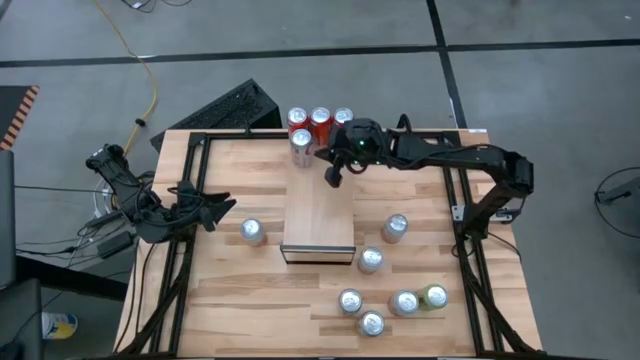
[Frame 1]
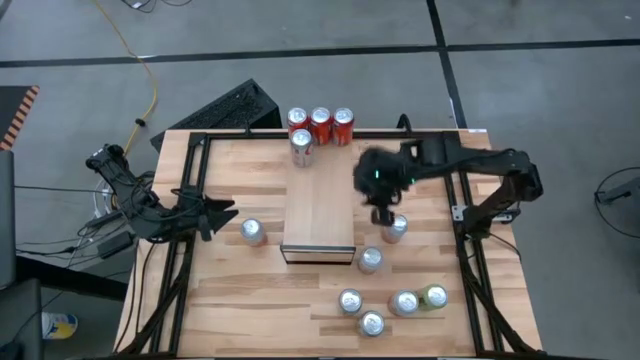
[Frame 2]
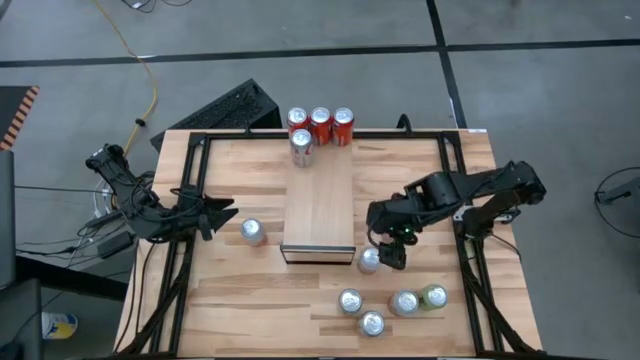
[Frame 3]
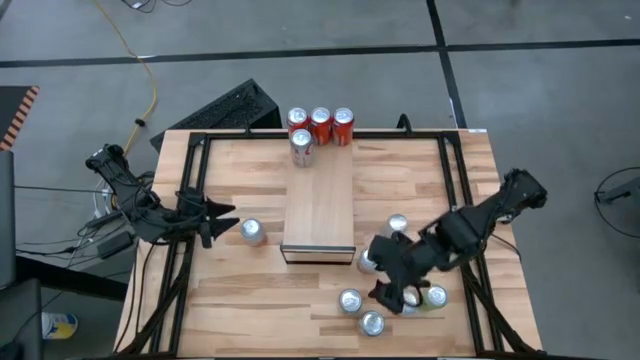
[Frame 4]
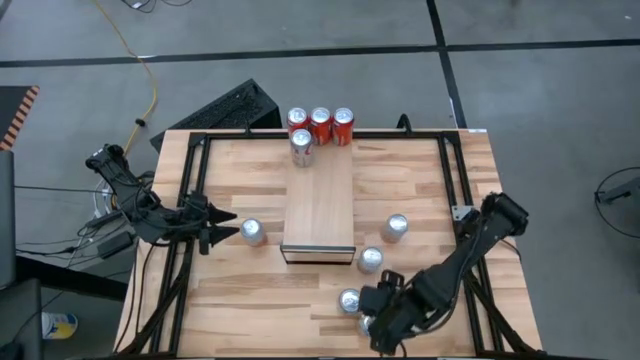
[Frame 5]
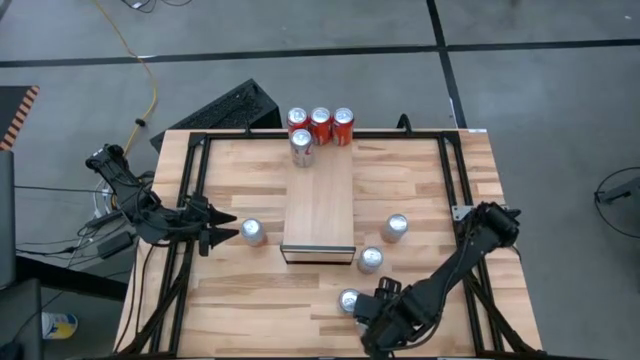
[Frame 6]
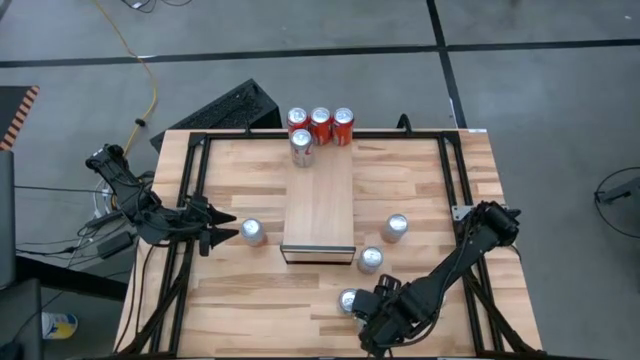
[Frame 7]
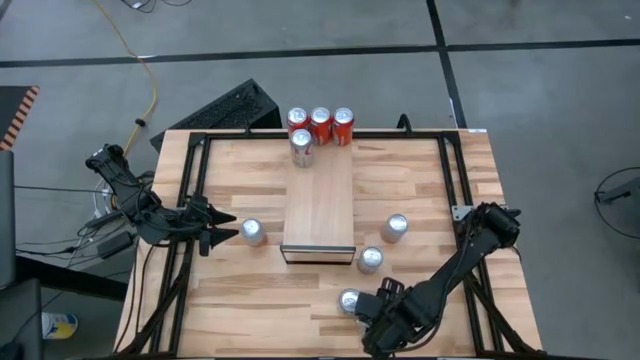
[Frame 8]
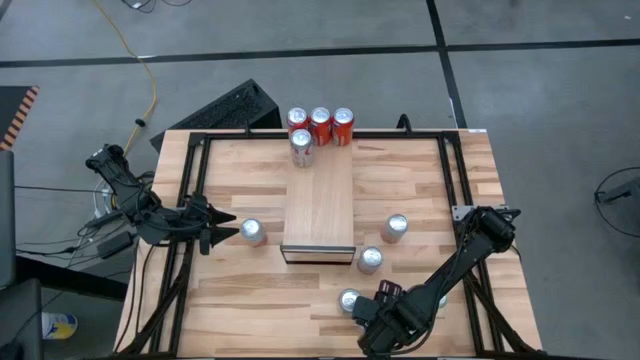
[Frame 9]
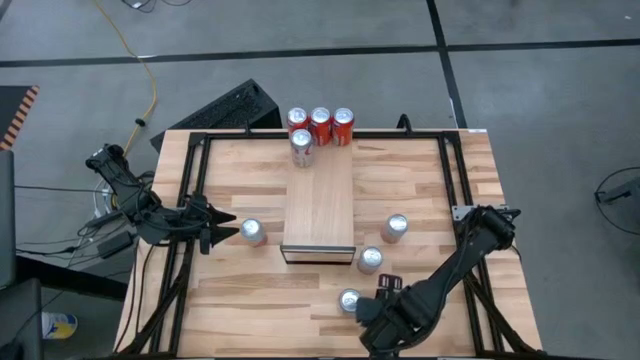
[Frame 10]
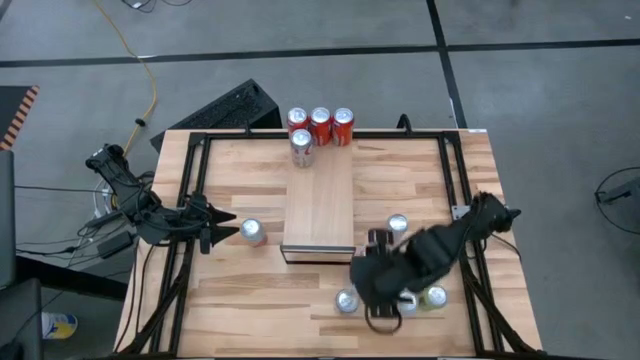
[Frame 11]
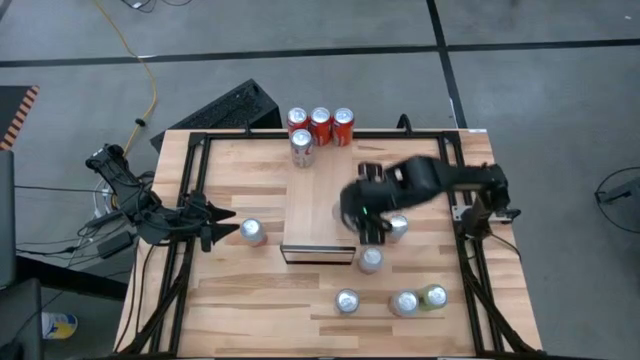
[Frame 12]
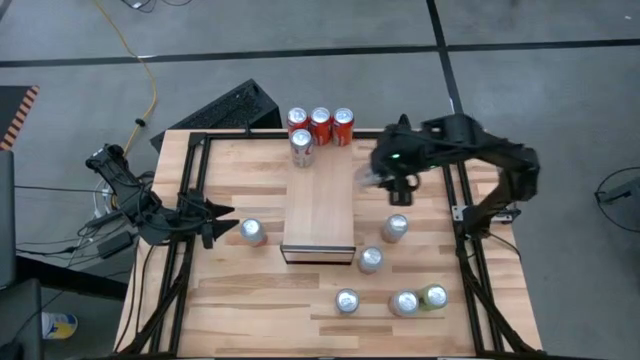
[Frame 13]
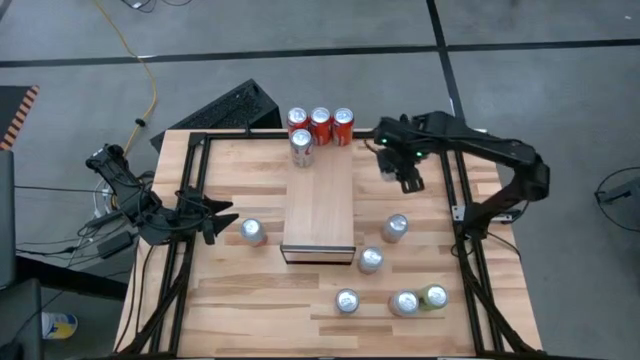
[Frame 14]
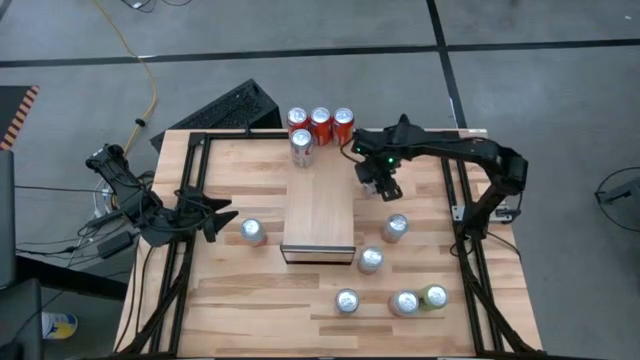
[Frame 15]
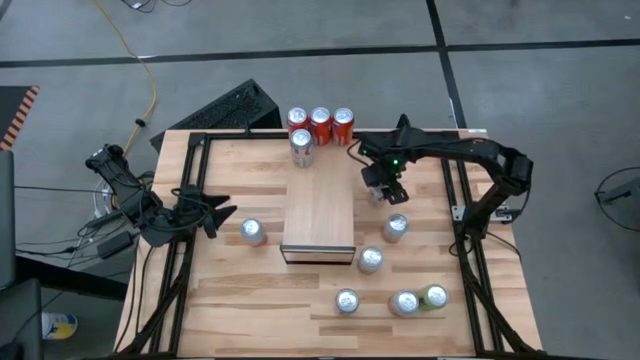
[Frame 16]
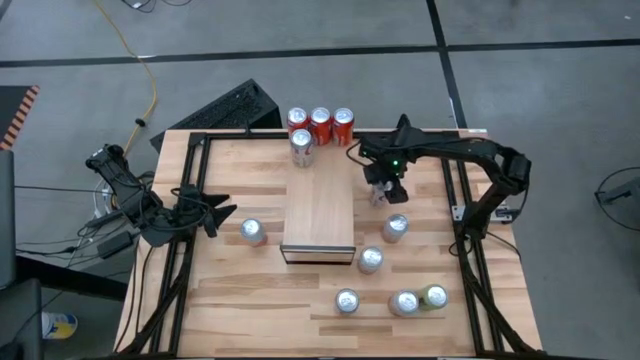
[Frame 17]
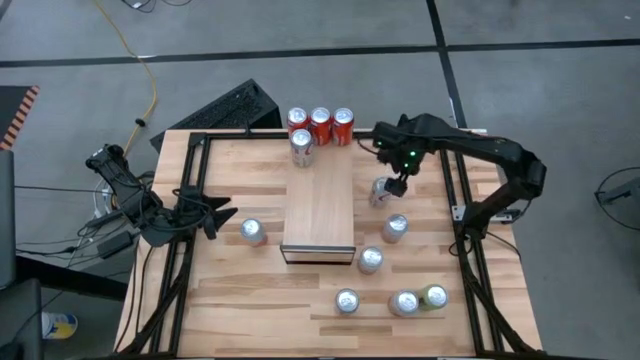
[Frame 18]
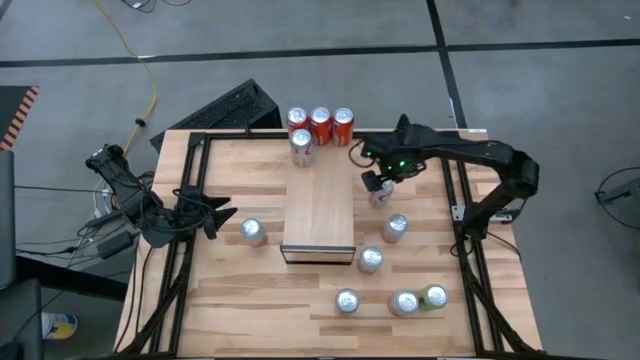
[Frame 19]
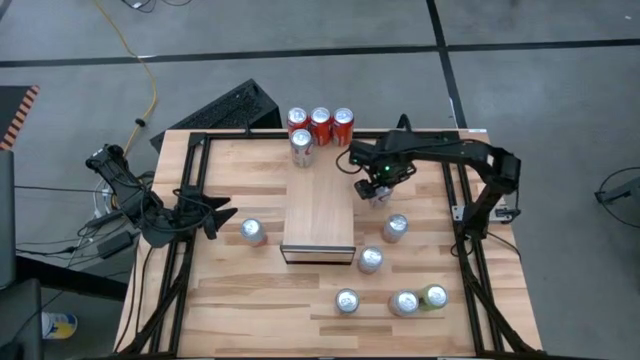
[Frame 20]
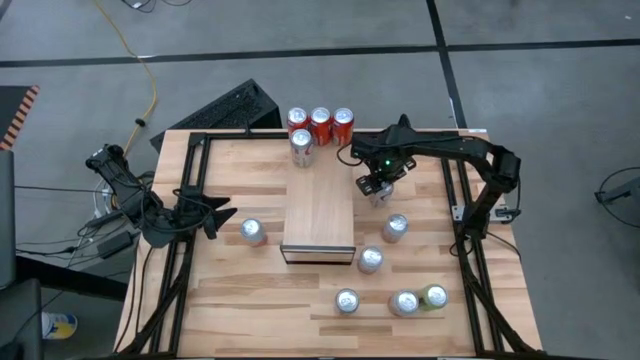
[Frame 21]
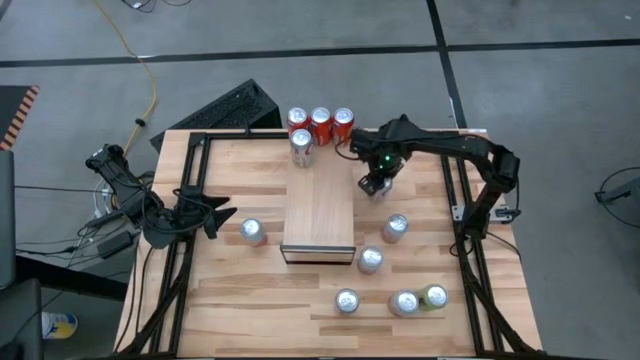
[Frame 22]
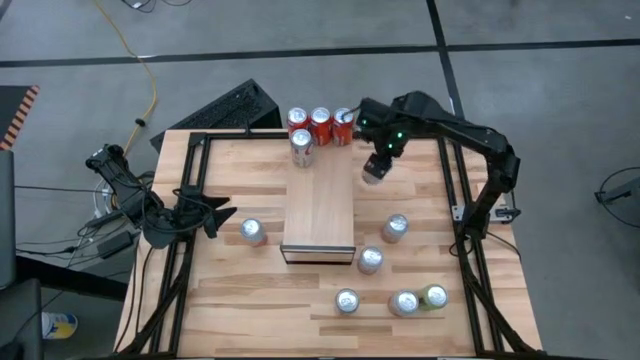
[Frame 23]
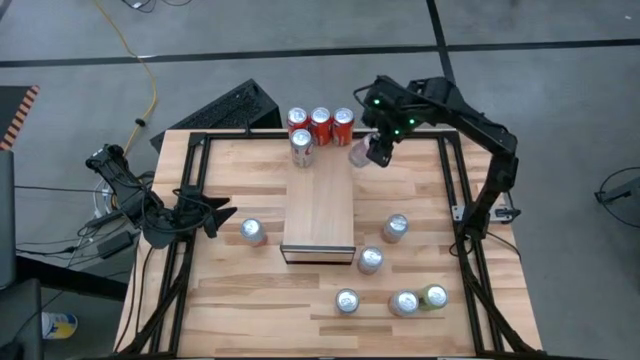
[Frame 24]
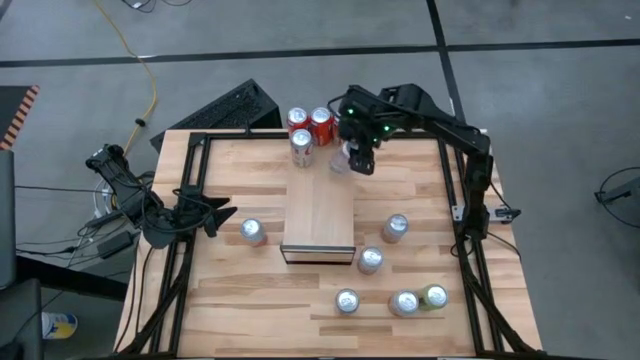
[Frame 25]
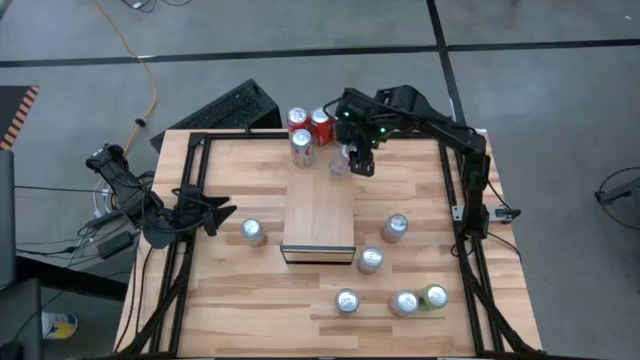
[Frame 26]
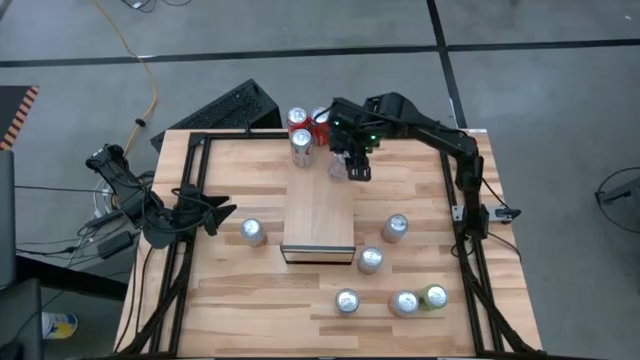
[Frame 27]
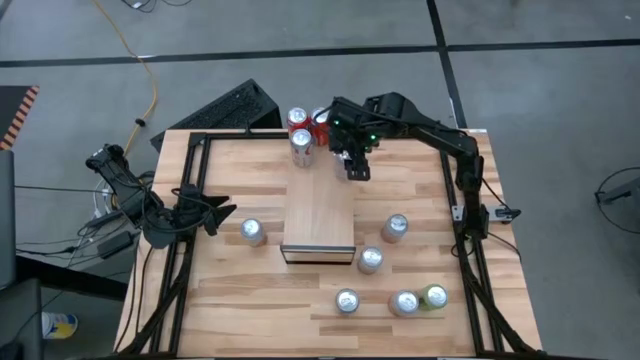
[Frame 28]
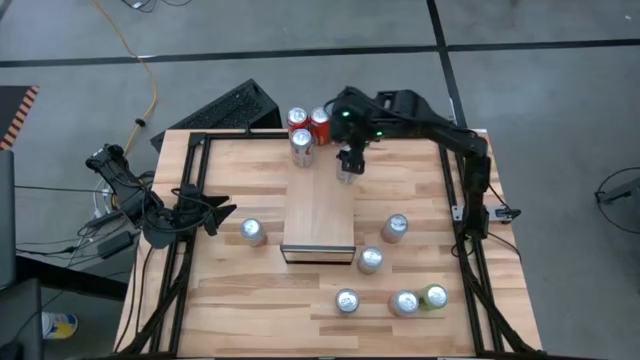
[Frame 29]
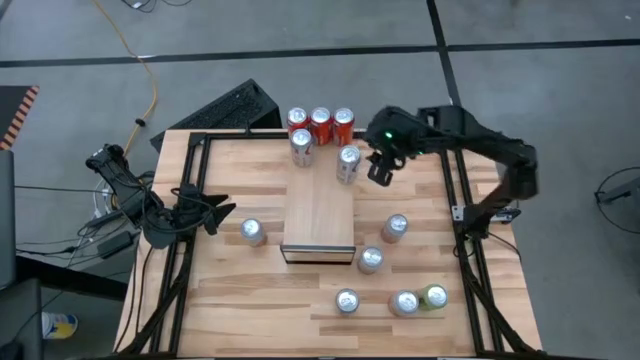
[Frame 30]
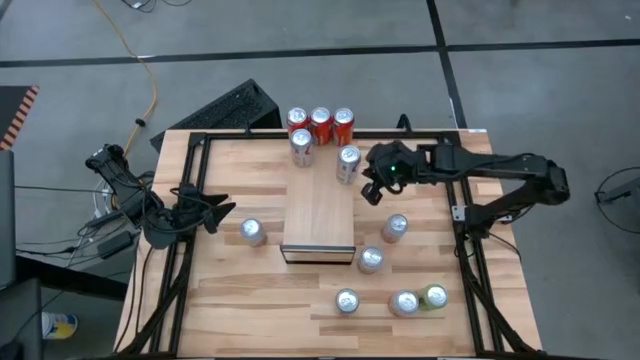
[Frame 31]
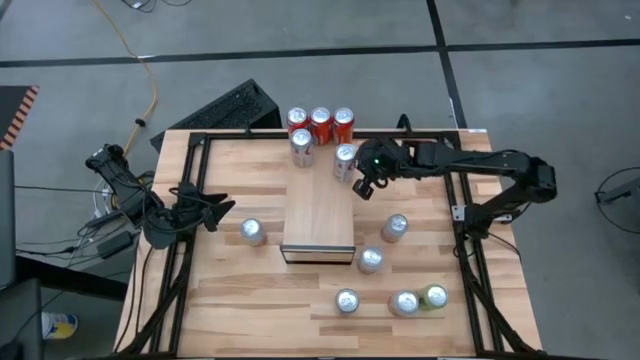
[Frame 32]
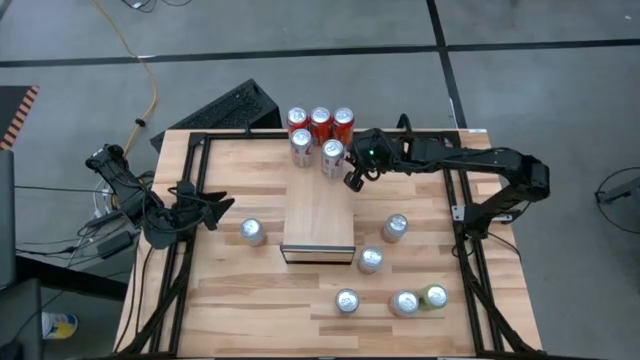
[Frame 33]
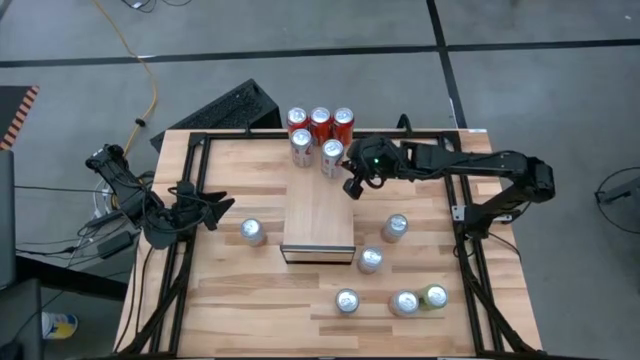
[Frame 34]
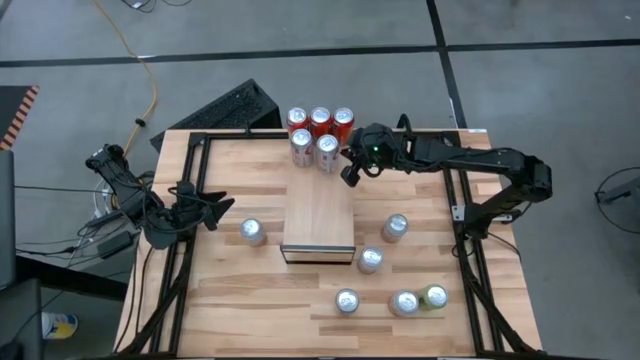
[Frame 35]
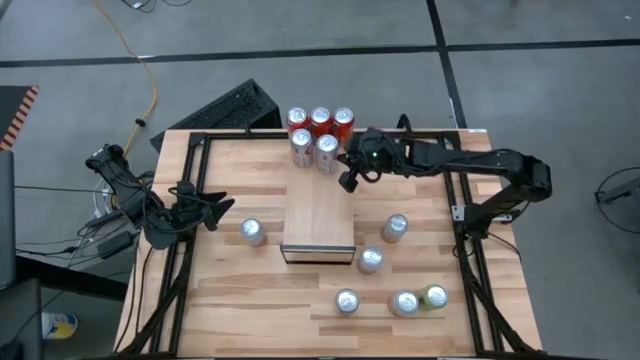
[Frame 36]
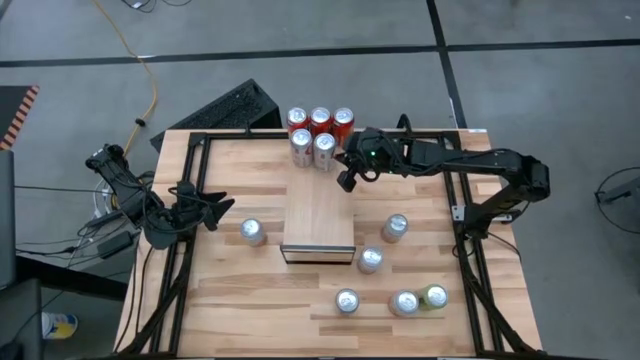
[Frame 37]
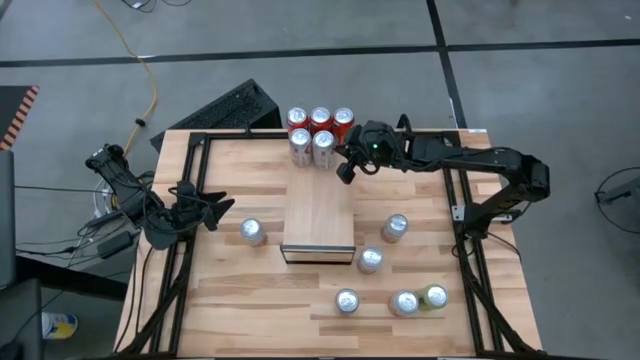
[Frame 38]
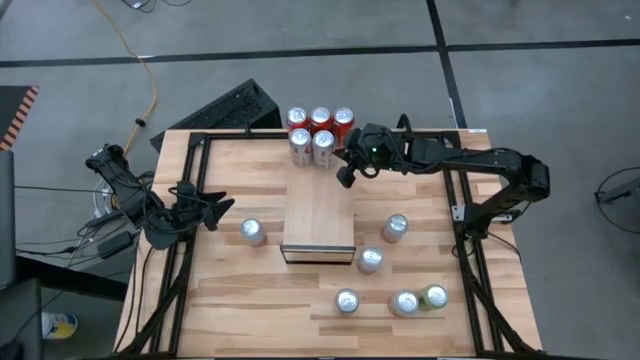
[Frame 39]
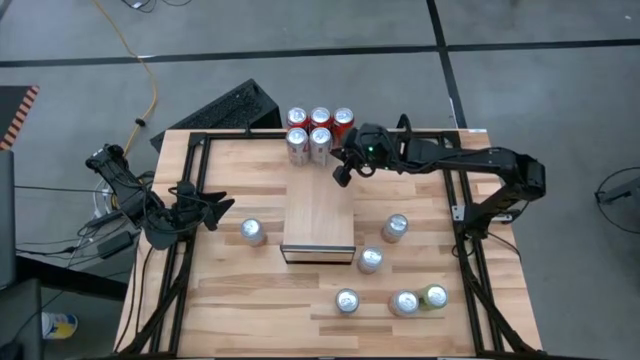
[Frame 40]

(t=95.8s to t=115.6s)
Task: Place canned beverage on shelf
Put the bottom red-silver soda can on the shelf aligned with the other red-silver soda can

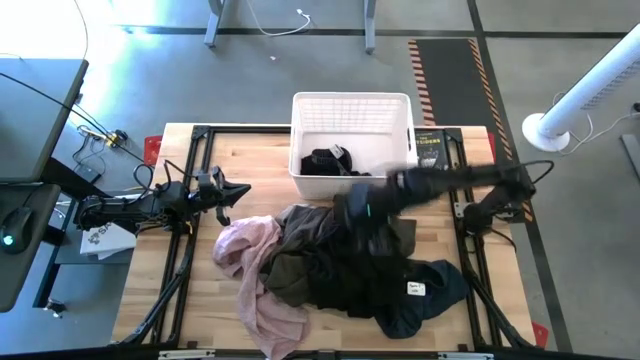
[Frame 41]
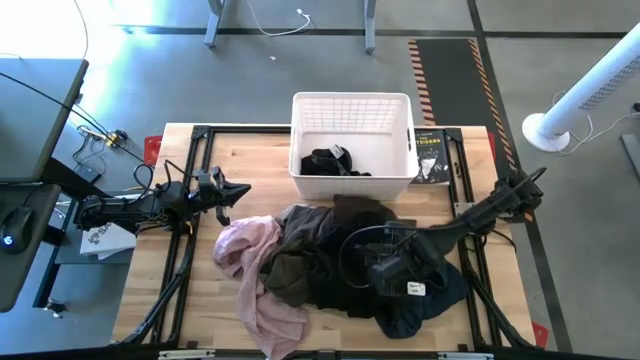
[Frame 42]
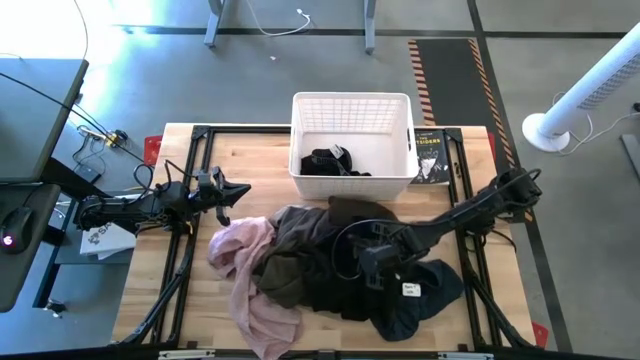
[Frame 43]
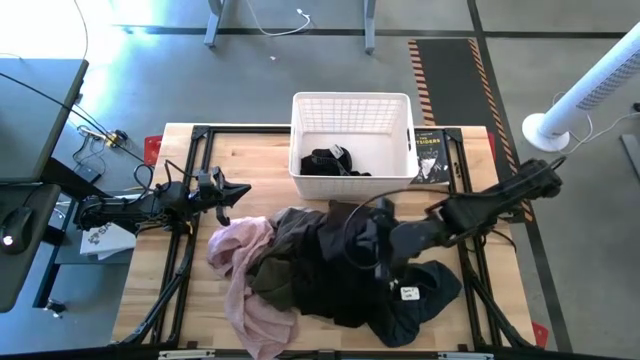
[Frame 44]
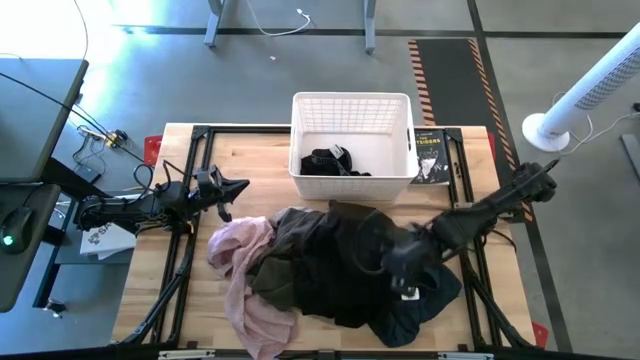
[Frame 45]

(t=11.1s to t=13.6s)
Task: Sort clothes
Put the black shorts into the laundry bin
